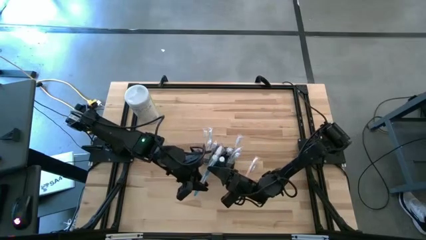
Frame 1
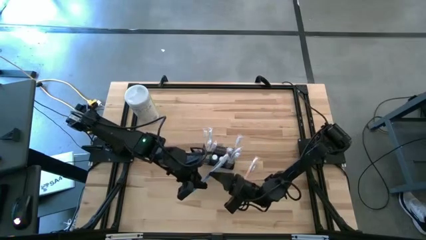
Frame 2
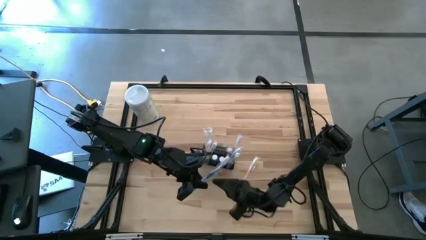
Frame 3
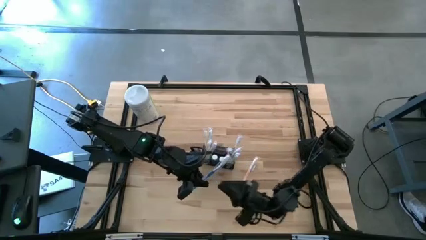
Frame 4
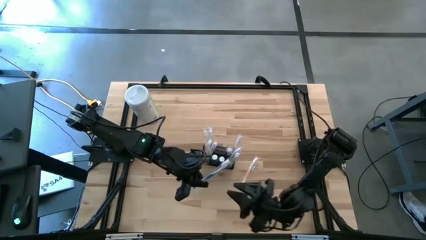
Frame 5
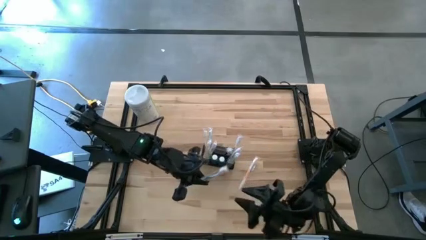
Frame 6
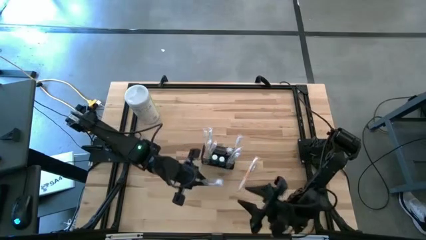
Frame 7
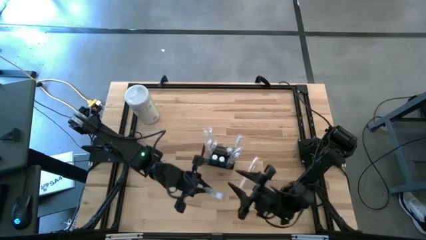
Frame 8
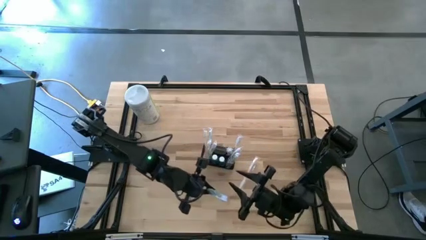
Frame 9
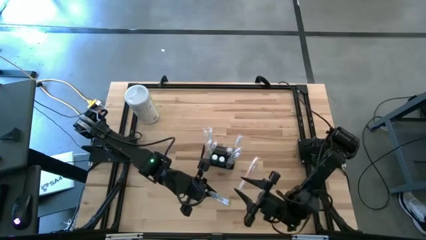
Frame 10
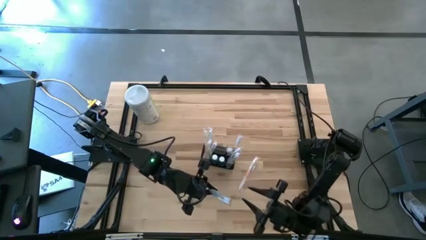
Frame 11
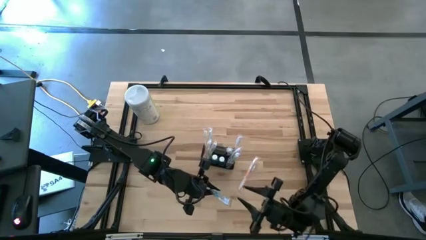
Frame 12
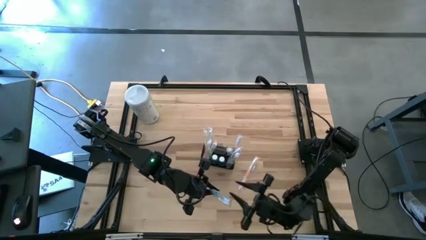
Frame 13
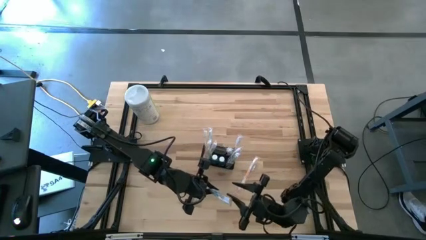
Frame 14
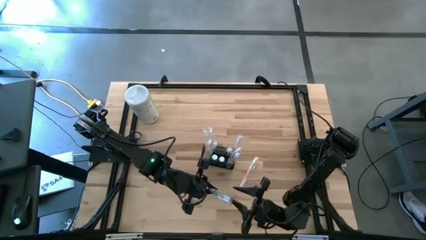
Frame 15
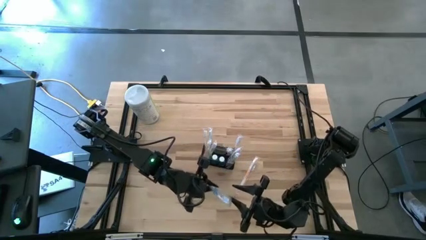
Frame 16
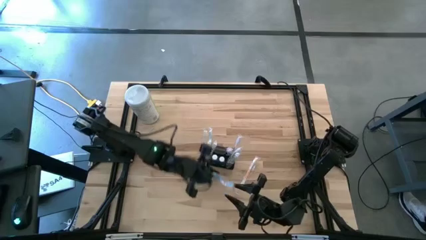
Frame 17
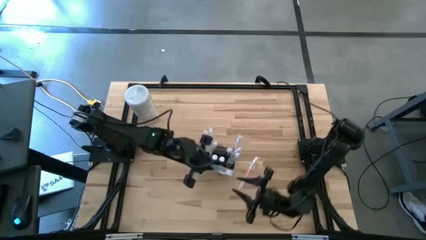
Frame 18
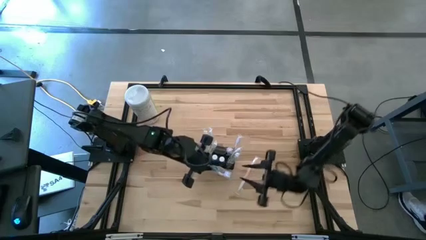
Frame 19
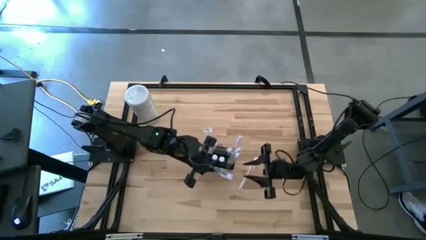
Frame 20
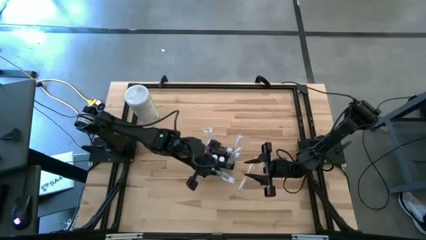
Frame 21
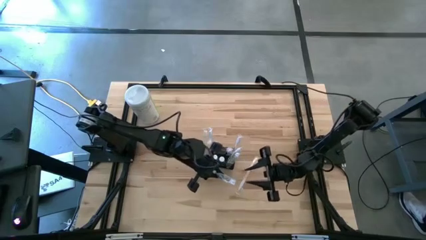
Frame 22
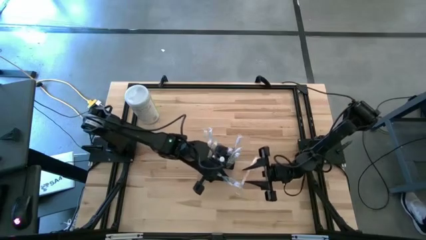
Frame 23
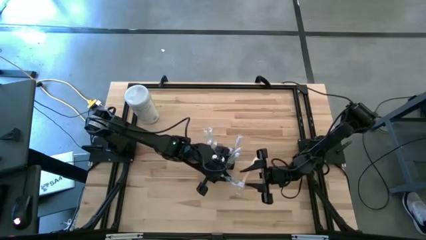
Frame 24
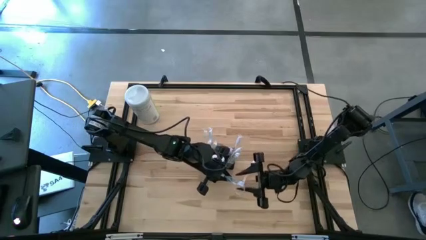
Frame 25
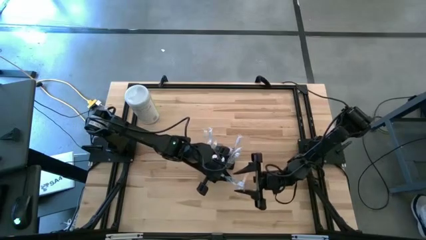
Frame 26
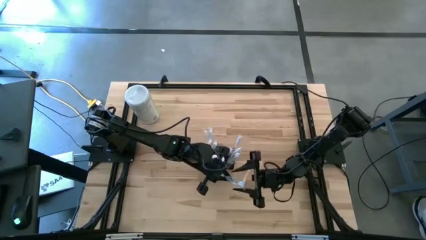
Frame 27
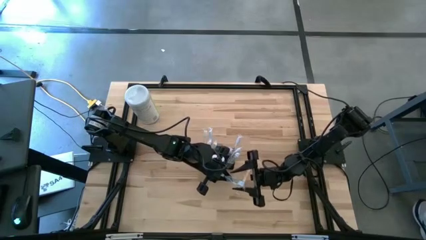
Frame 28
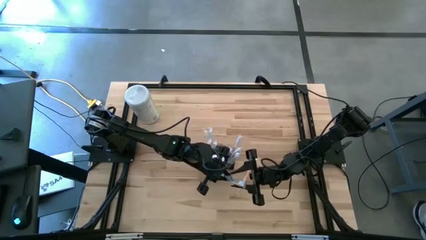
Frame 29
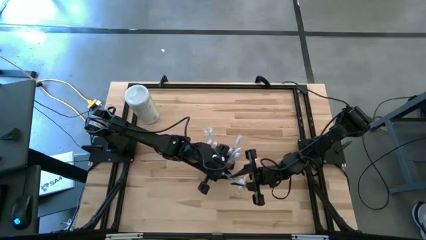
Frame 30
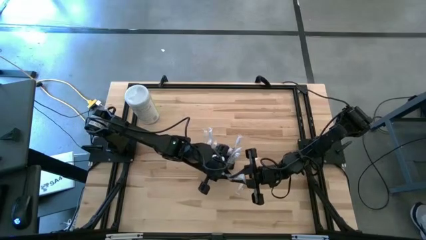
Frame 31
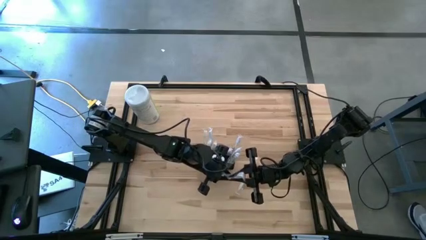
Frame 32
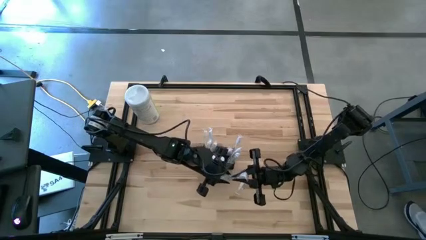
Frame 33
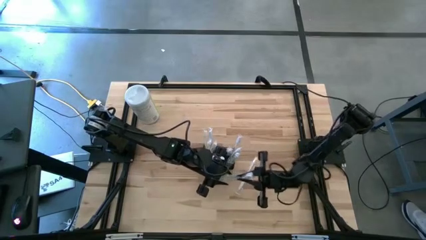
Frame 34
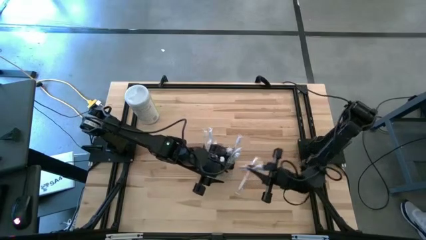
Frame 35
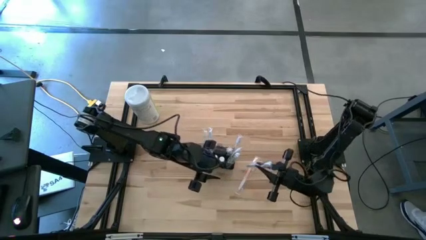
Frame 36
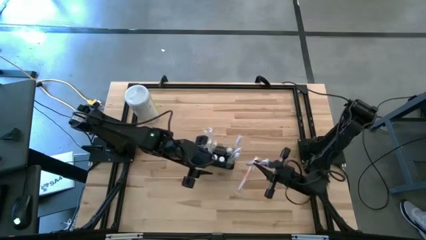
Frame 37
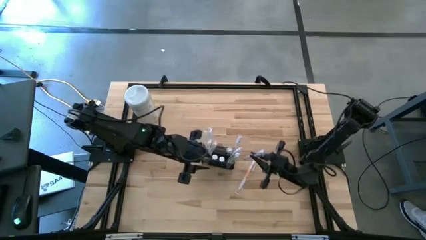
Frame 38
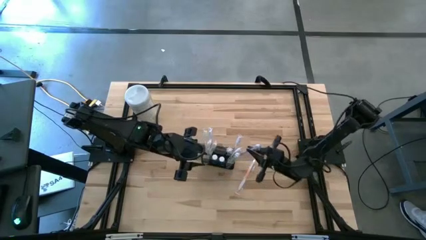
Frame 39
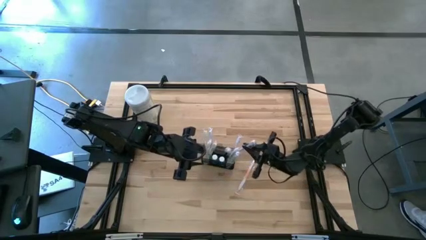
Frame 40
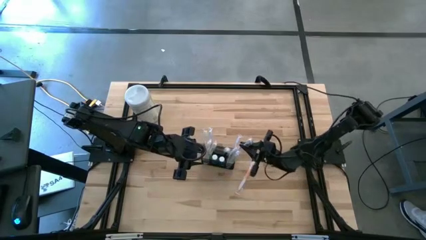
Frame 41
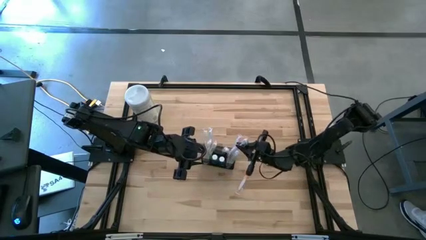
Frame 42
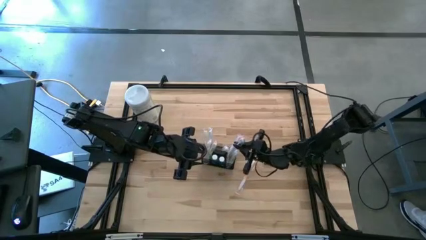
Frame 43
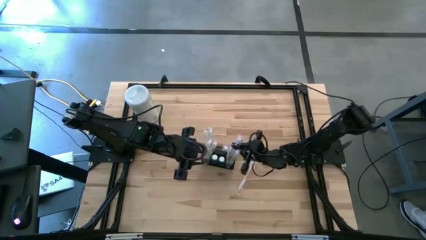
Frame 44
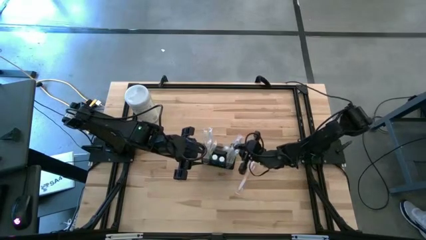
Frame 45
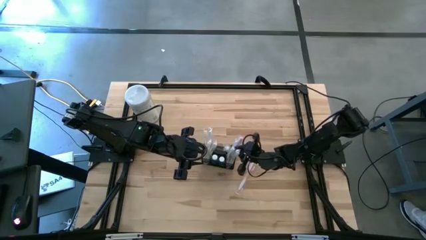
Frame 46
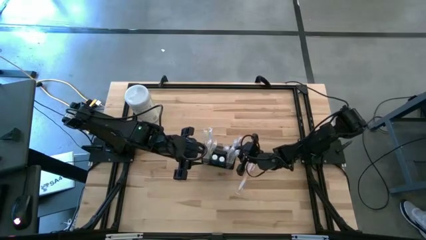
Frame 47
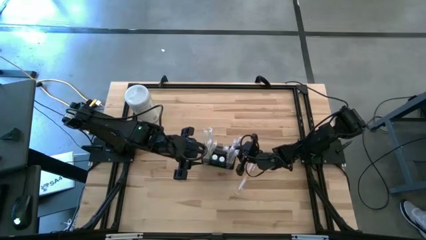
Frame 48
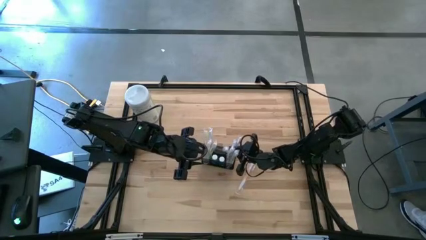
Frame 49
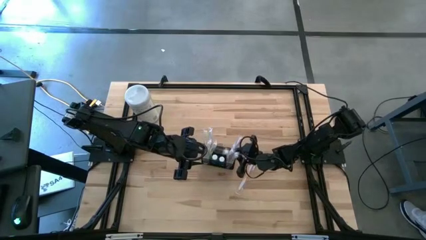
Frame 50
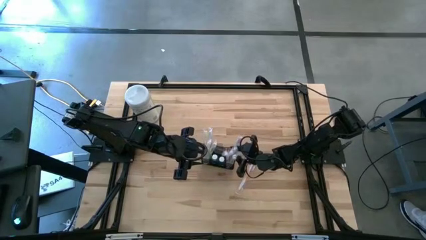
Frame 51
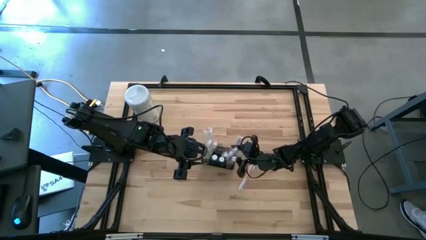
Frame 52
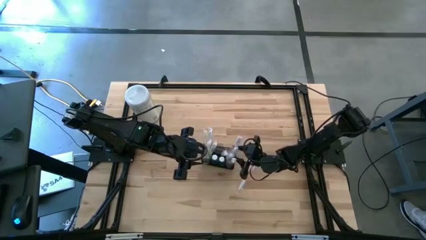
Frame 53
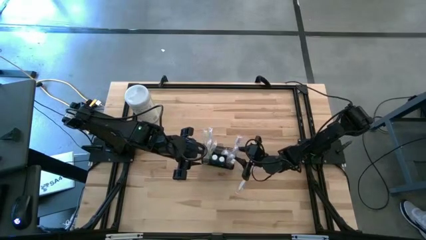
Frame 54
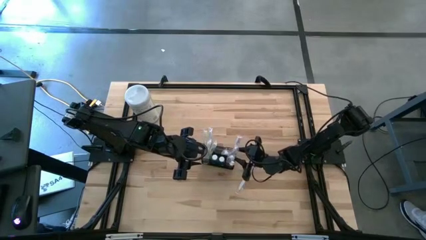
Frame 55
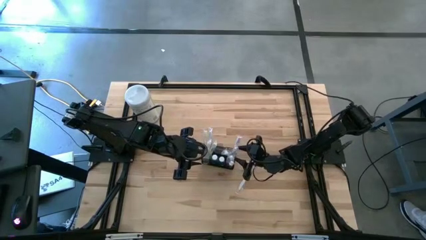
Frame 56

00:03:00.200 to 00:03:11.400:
Task: Pick & Place toothbrushing station
Put the blue toothbrush into the mesh organizer
